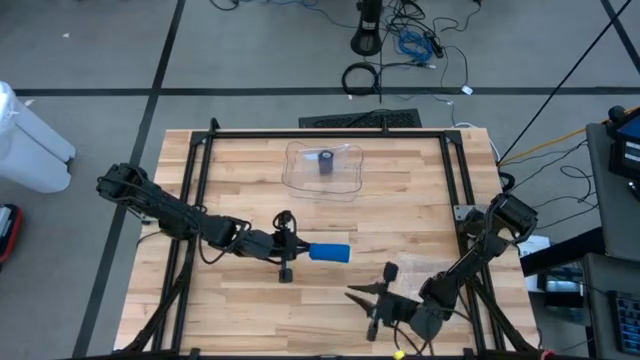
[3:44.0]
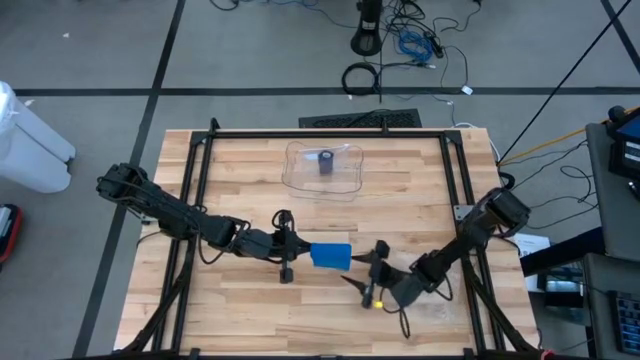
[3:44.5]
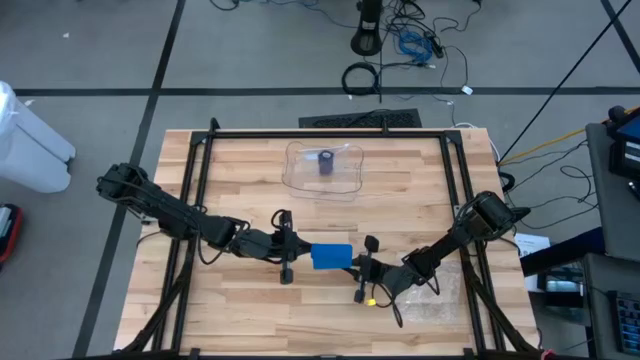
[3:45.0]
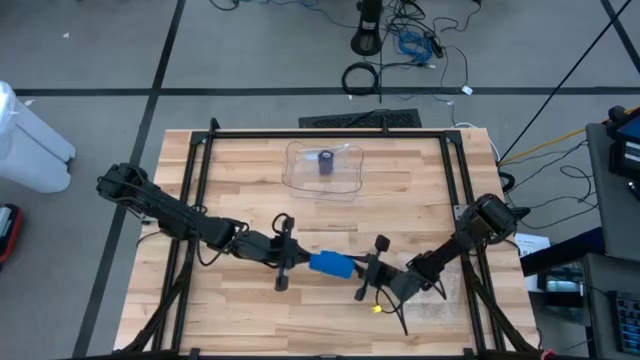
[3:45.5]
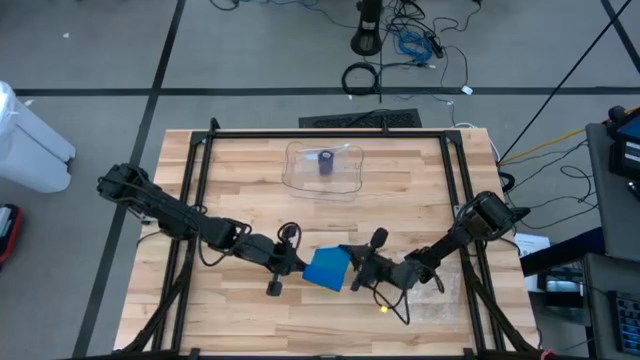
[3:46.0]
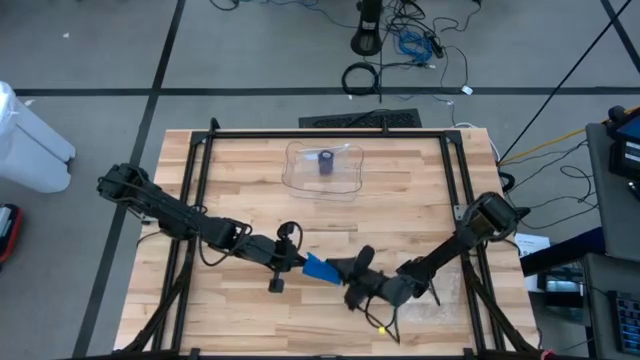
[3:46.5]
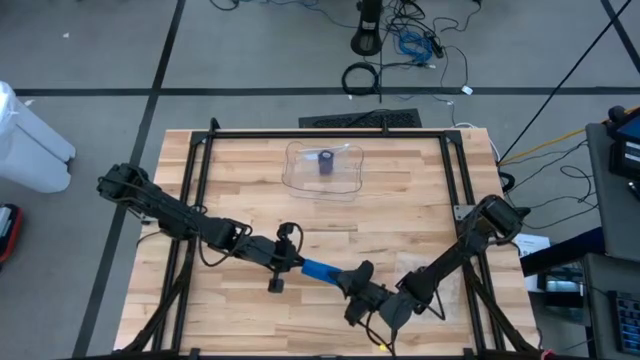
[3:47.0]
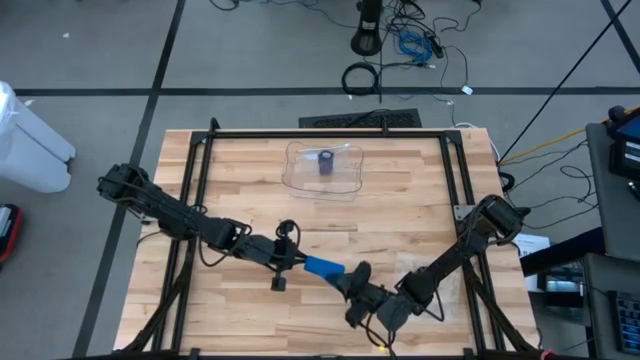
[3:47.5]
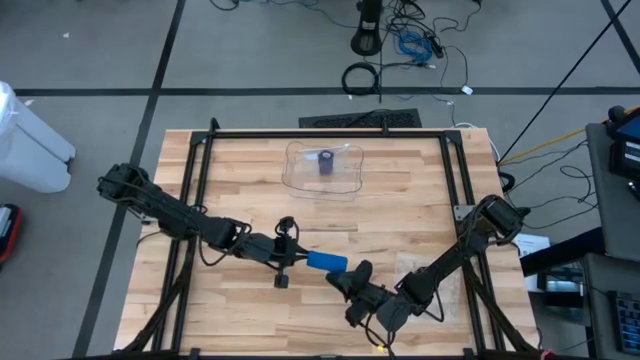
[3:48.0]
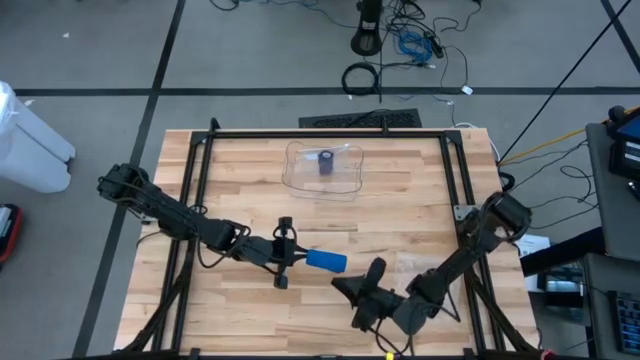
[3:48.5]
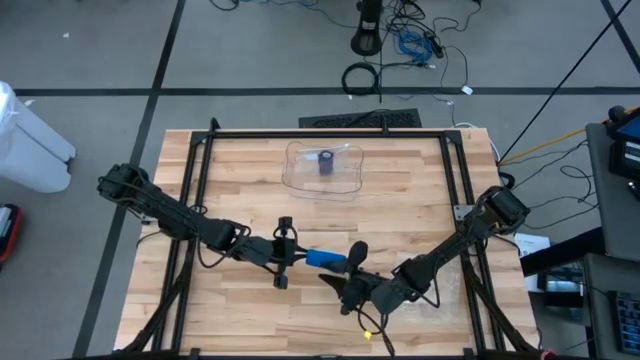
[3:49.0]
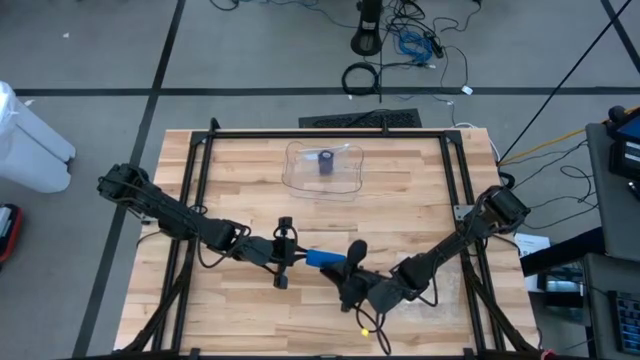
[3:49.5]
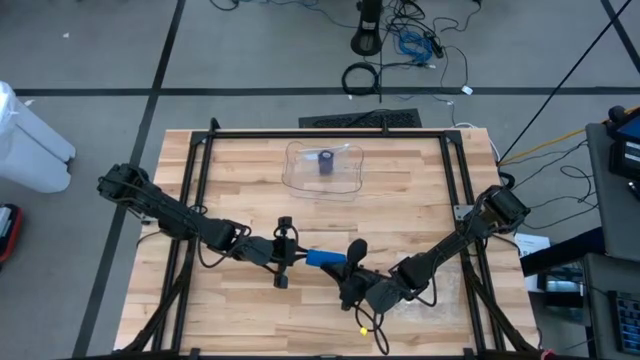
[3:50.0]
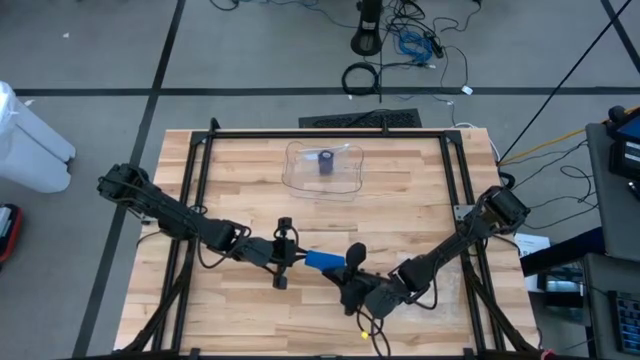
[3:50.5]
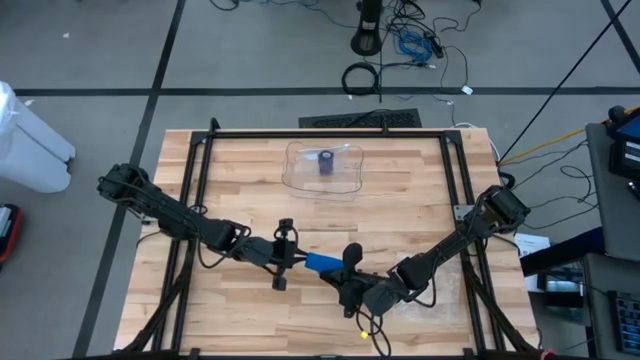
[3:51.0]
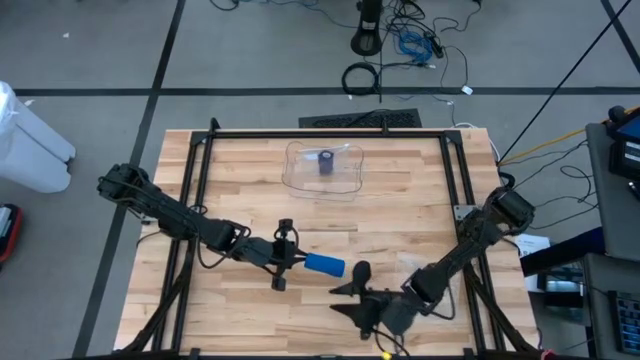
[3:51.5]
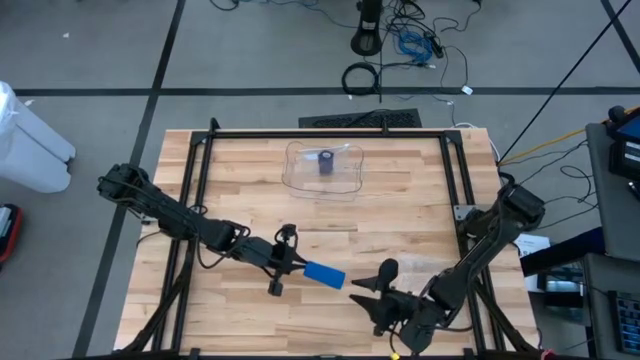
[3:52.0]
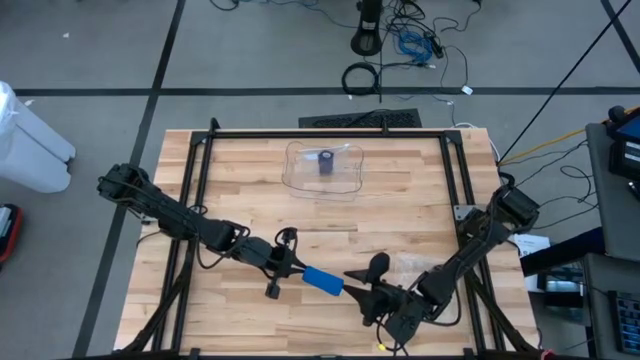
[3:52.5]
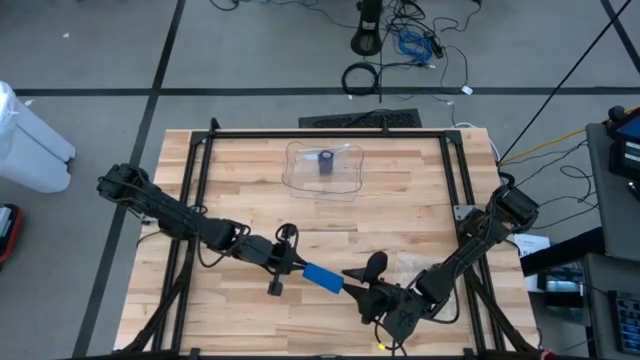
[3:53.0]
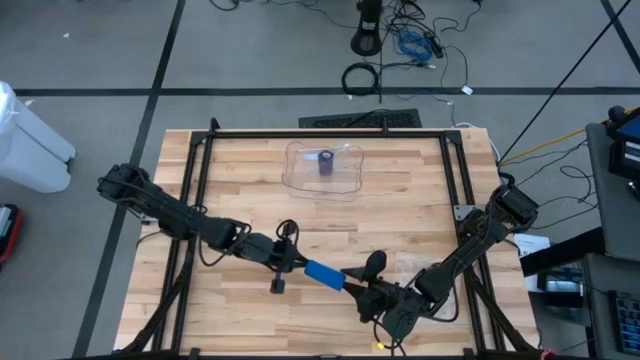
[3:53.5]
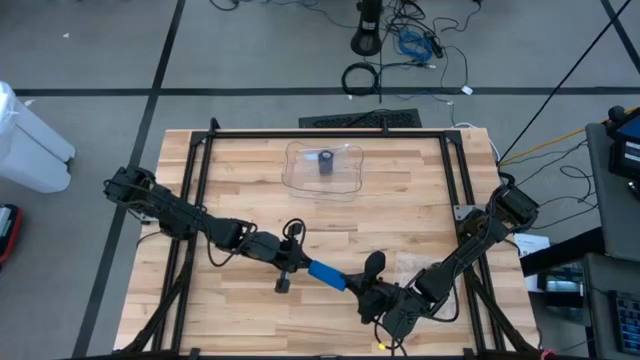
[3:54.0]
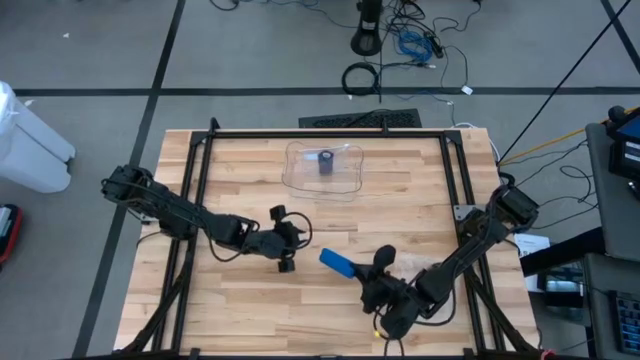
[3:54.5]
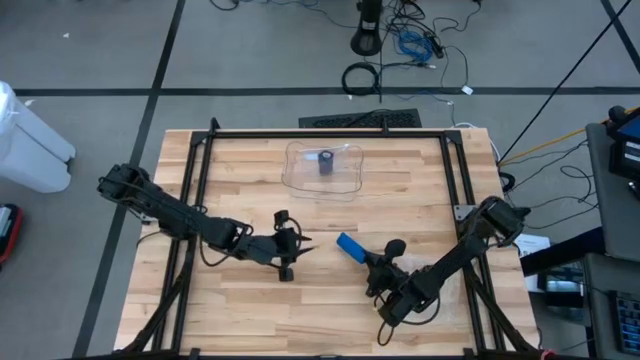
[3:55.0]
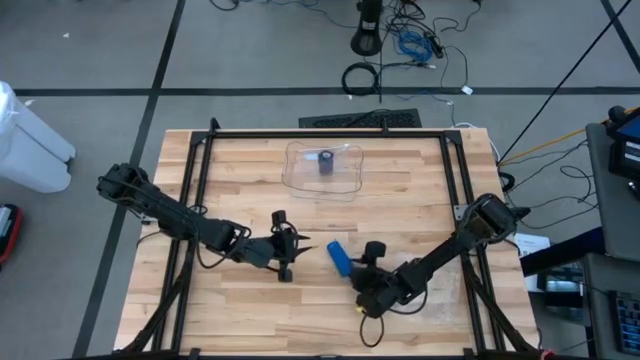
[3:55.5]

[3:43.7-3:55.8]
Task: Roll bandage
Roll the blue bandage

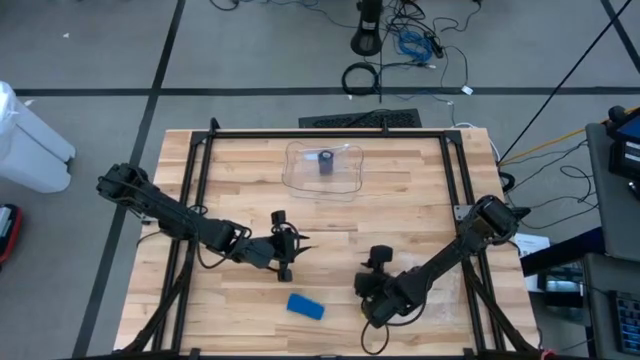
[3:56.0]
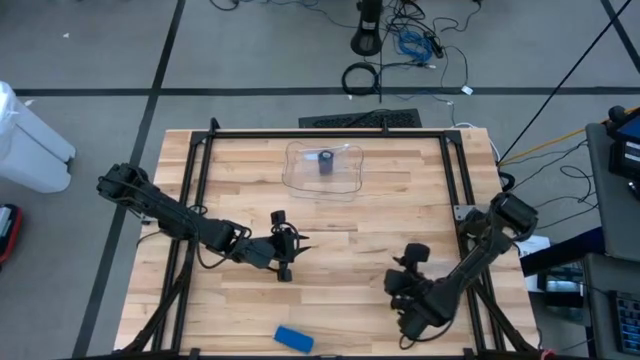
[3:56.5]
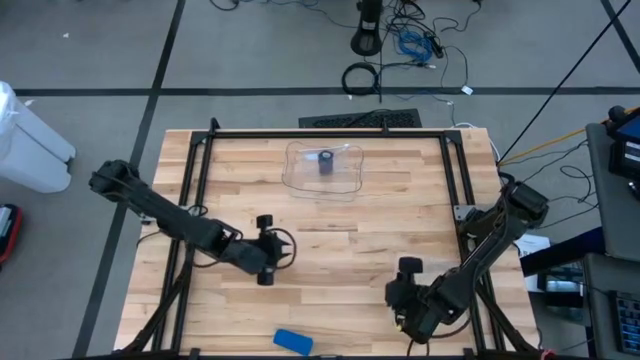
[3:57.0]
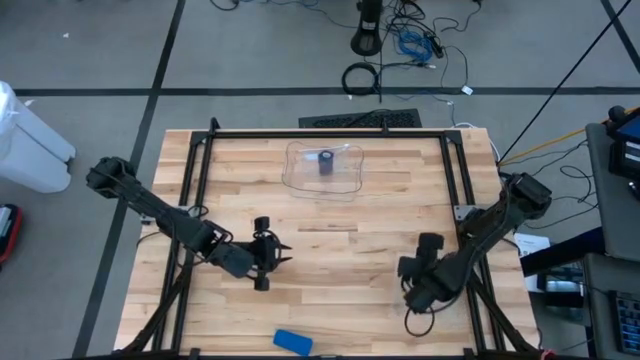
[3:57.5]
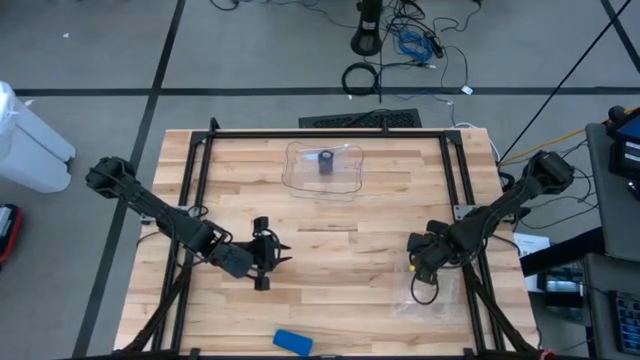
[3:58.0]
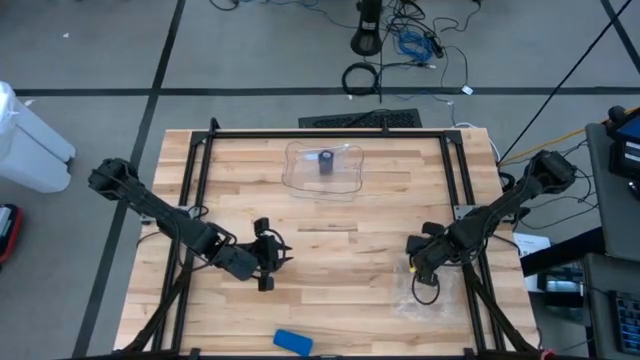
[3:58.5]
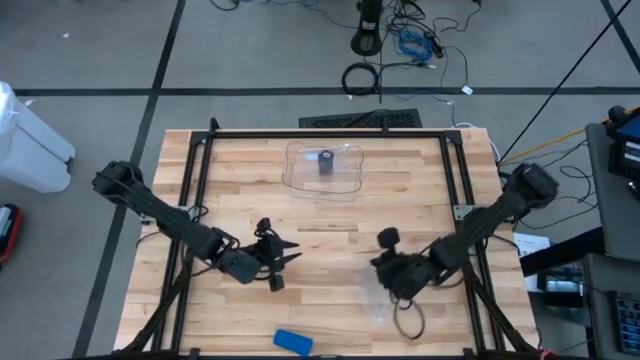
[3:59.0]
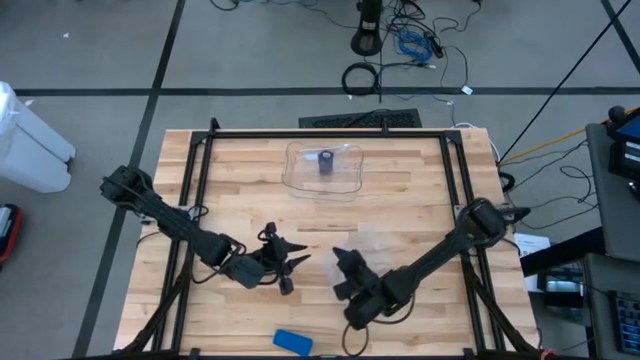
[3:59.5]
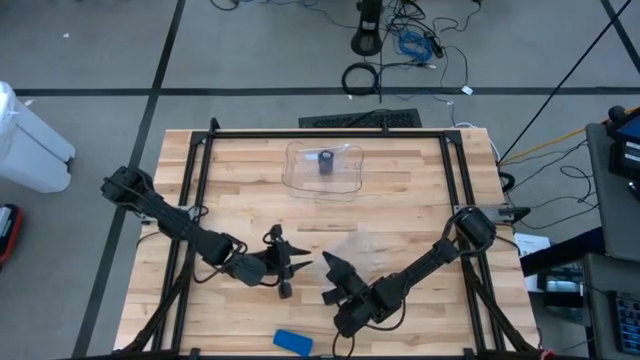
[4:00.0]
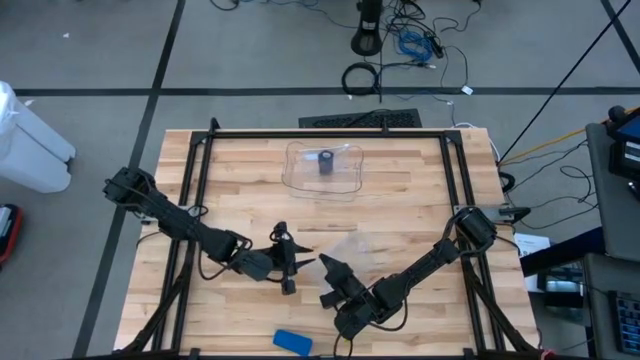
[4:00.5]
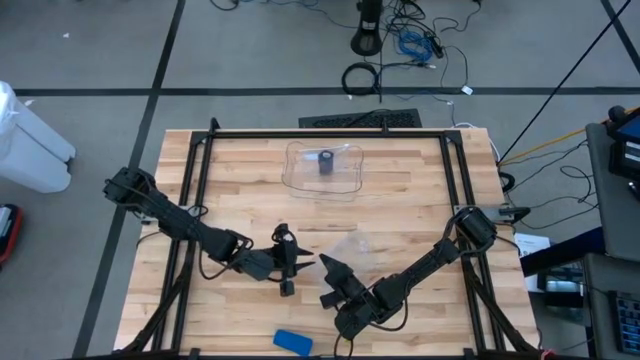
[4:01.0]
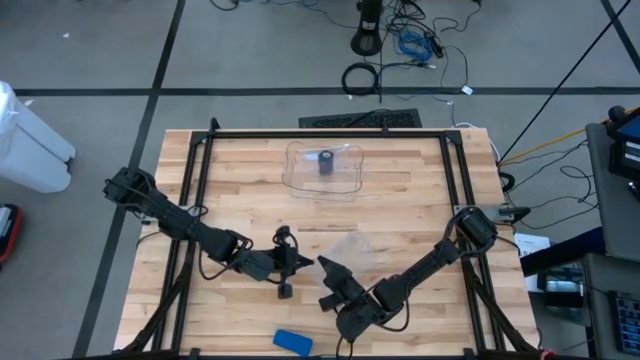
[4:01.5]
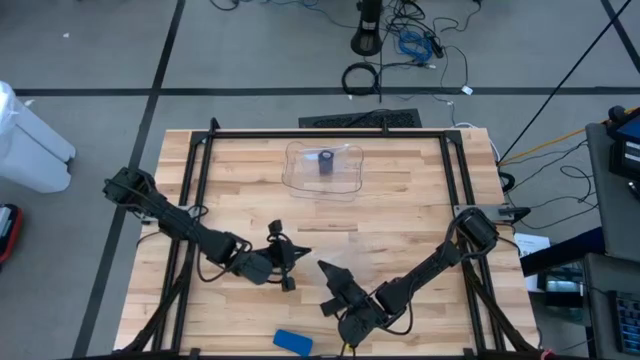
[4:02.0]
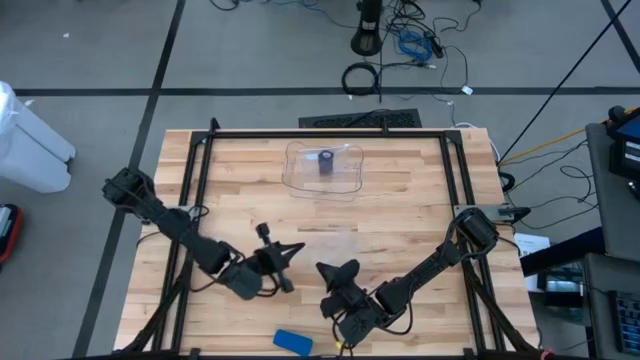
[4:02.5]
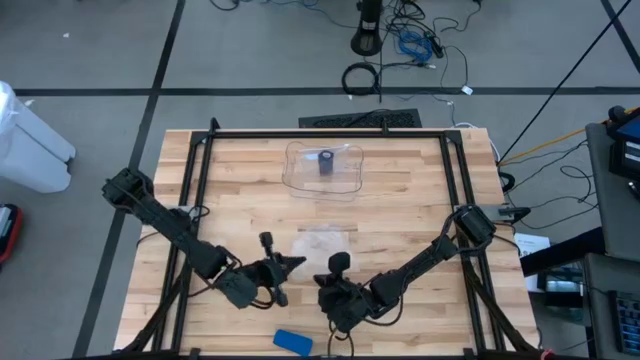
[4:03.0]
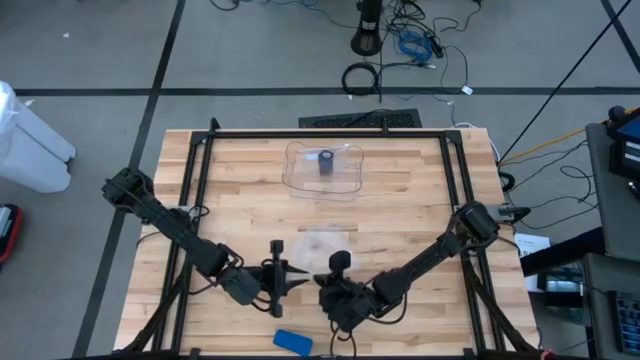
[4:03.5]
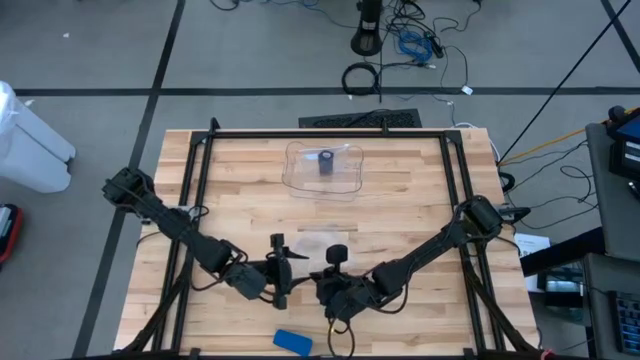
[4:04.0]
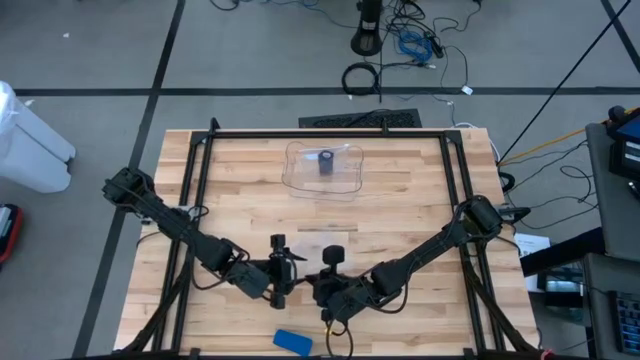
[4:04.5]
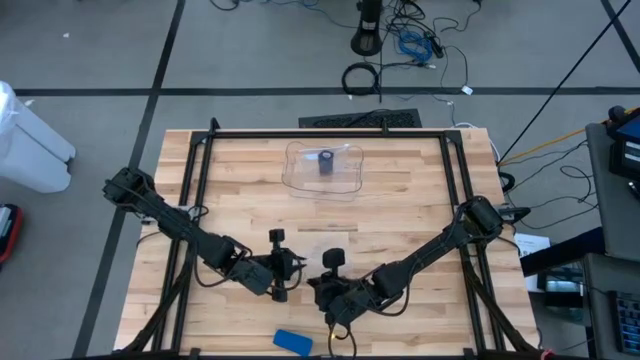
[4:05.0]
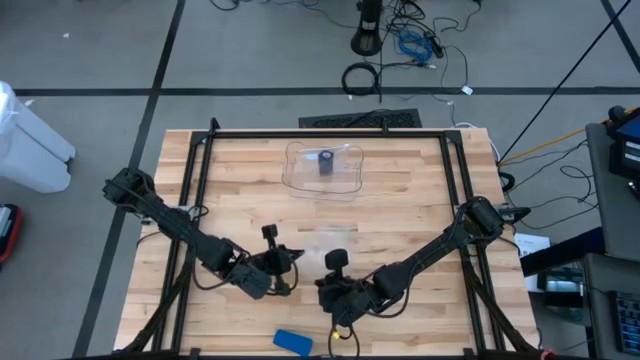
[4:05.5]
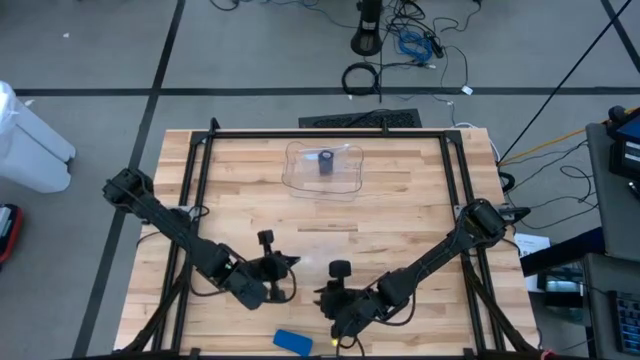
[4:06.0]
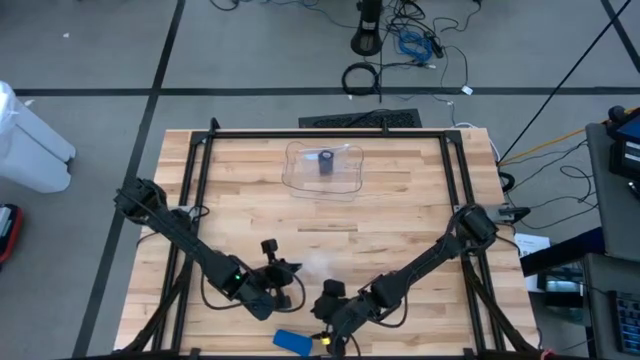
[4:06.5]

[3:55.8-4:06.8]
Prepare the transparent zip bag
